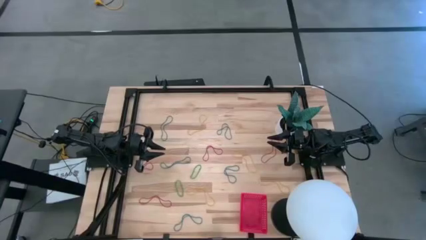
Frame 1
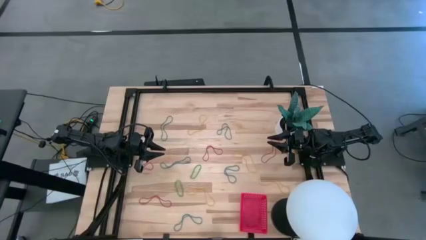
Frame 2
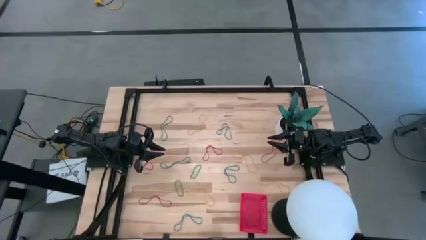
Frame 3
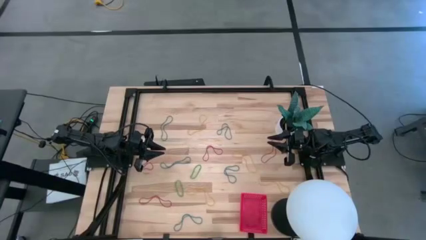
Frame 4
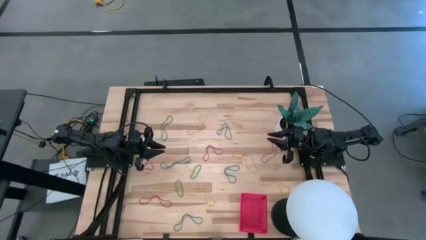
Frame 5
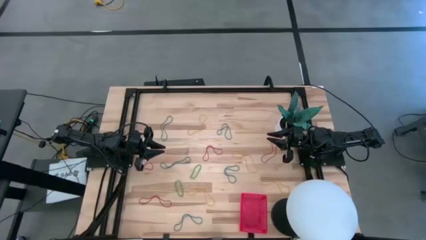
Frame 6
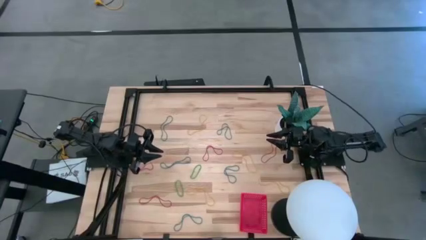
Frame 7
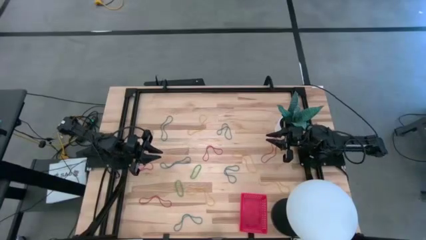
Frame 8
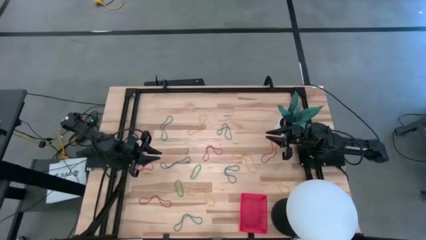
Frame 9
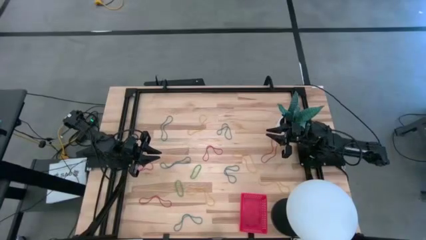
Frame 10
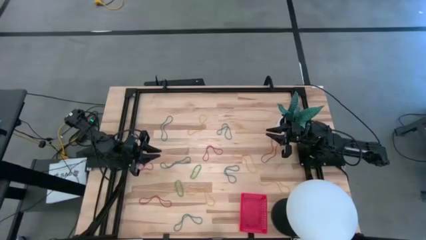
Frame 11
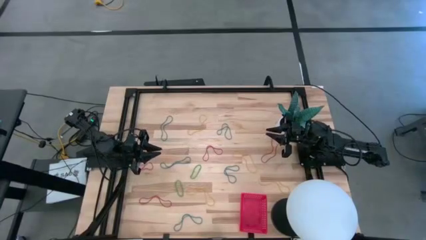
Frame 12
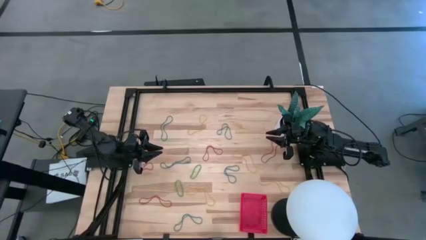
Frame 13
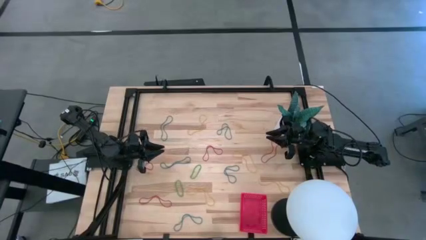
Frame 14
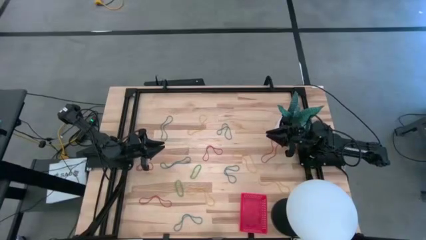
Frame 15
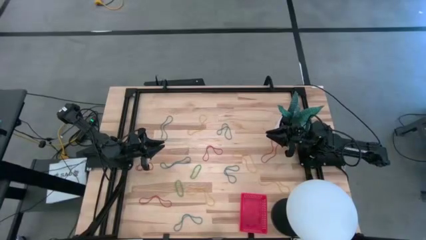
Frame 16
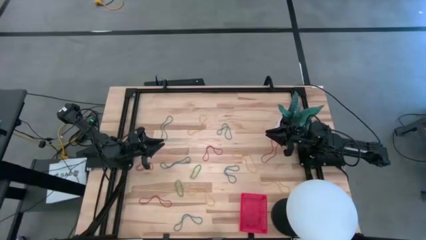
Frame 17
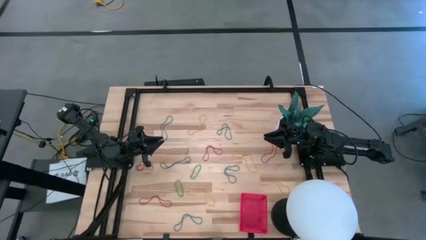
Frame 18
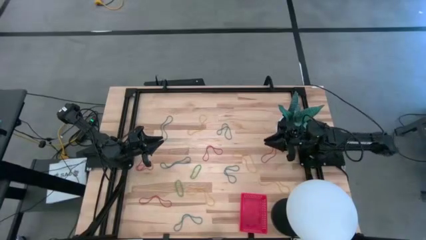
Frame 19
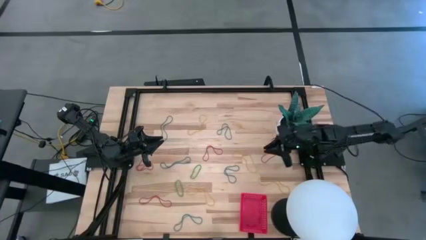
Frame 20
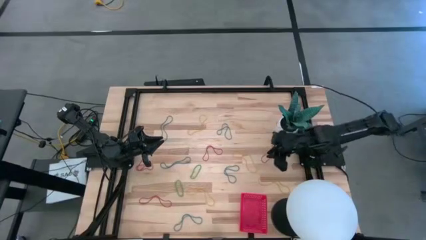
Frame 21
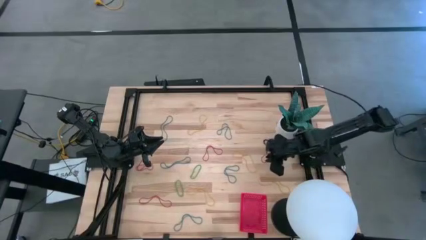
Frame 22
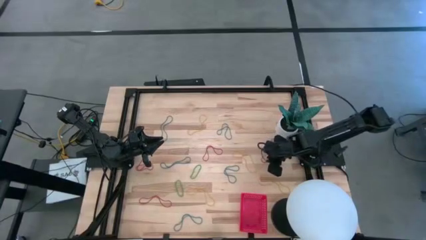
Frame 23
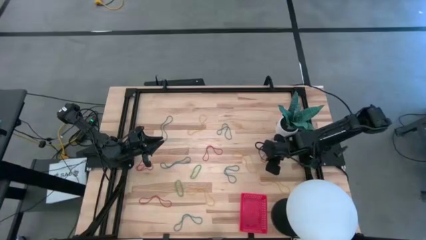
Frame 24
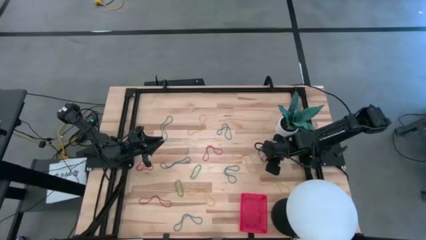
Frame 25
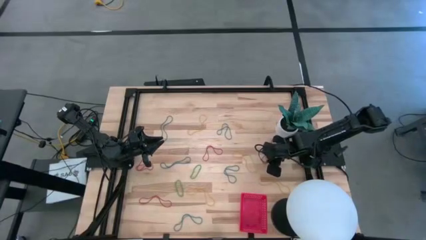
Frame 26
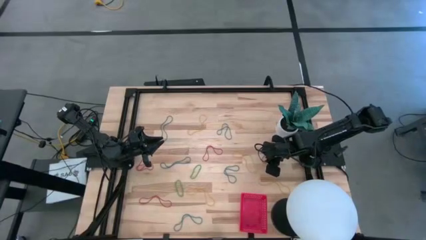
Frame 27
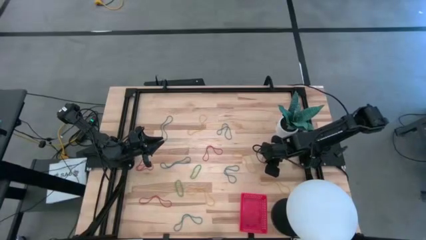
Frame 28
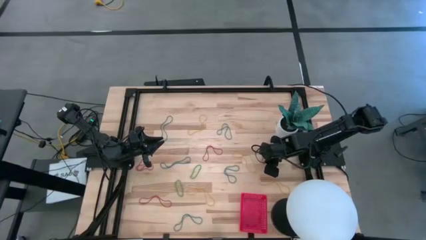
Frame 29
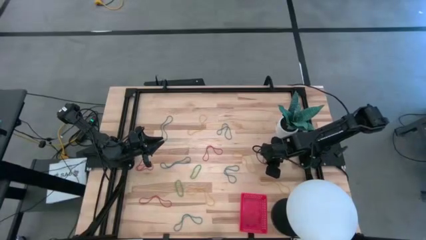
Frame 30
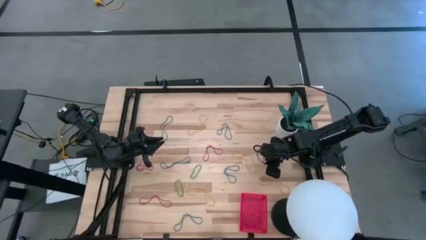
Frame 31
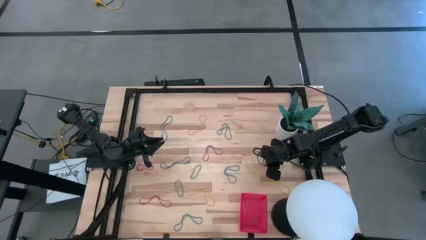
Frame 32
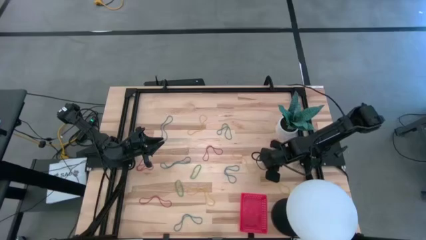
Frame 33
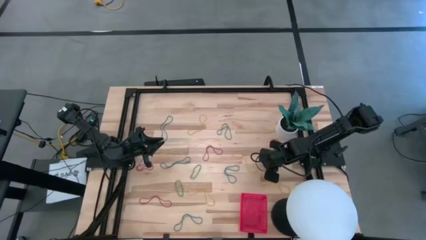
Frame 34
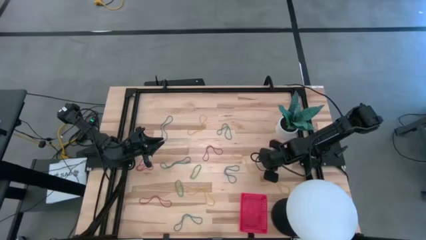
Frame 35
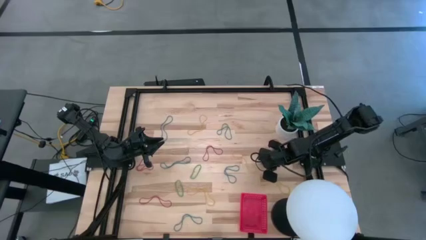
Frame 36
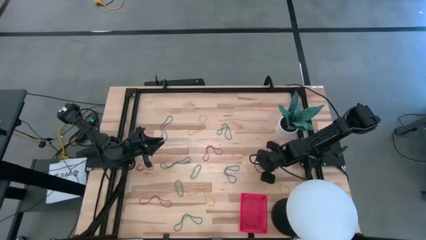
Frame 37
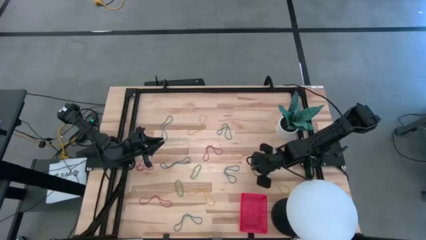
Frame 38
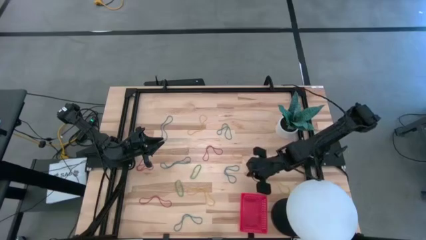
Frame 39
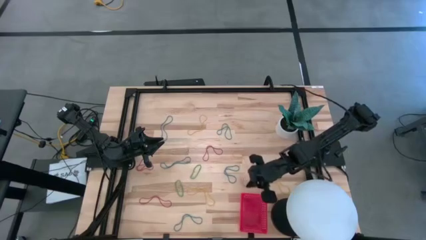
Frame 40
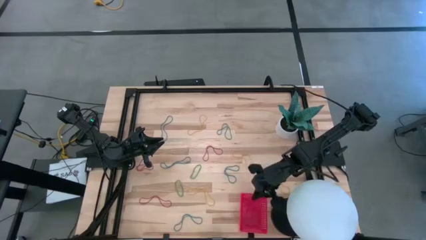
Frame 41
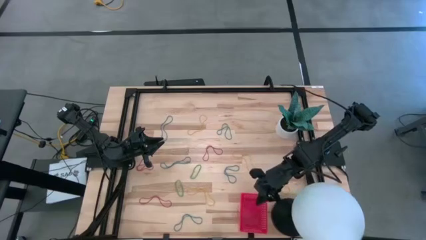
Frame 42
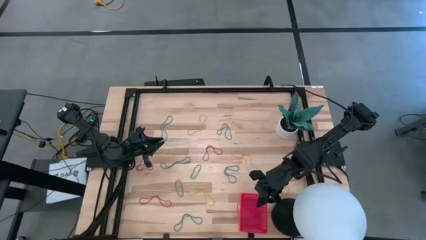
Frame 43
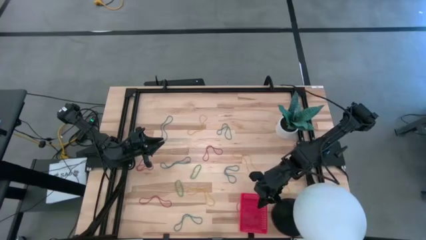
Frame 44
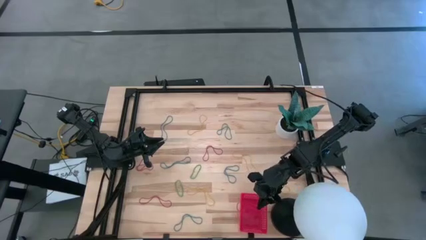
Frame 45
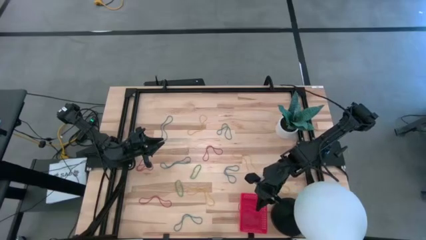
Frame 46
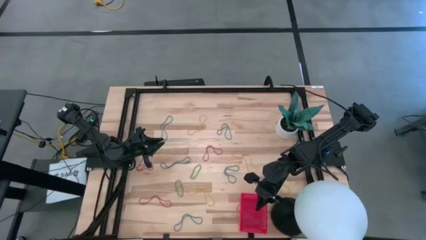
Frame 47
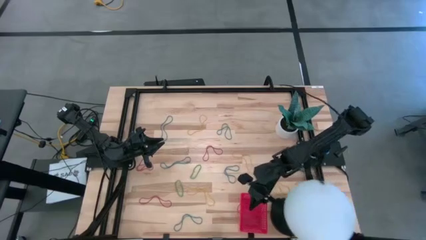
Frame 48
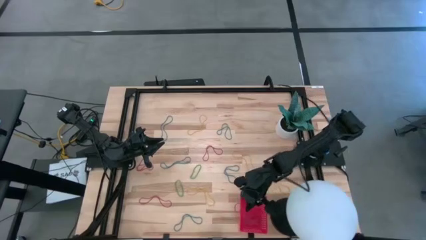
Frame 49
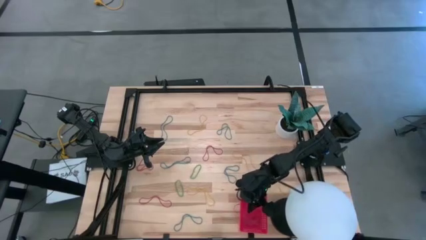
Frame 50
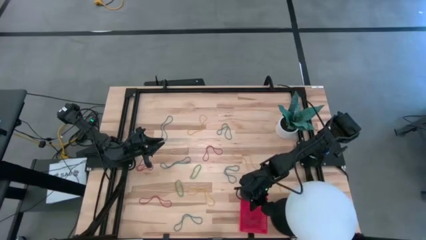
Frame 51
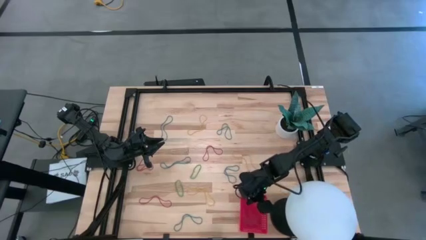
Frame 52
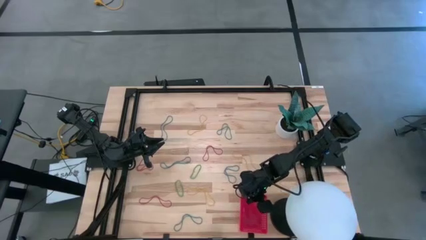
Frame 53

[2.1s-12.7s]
Task: Pick and place items into bin
Put the red rubber band into the red bin
